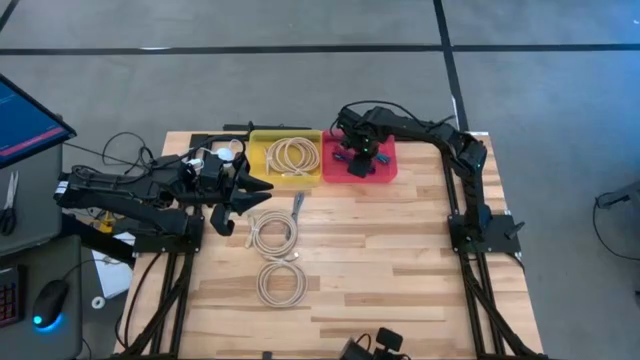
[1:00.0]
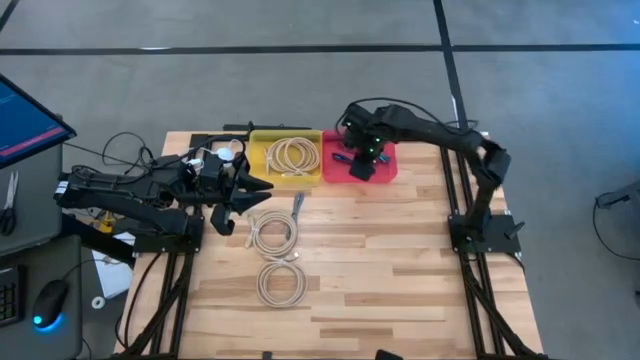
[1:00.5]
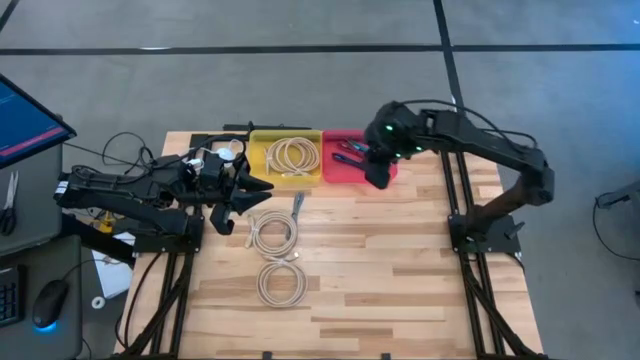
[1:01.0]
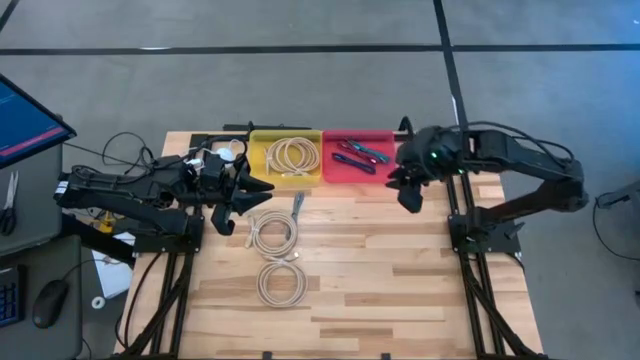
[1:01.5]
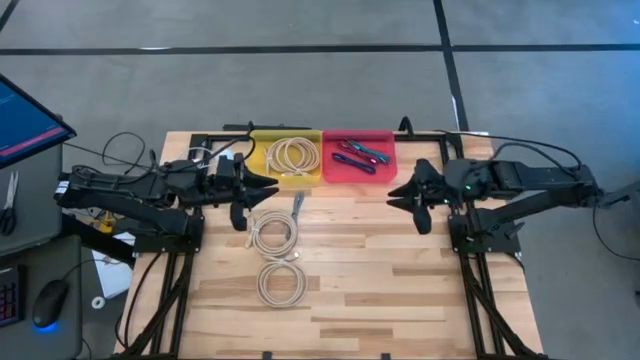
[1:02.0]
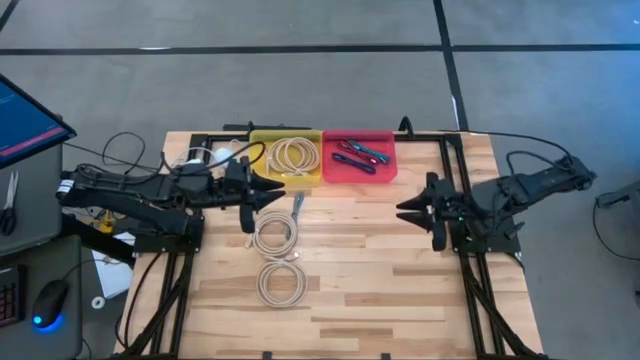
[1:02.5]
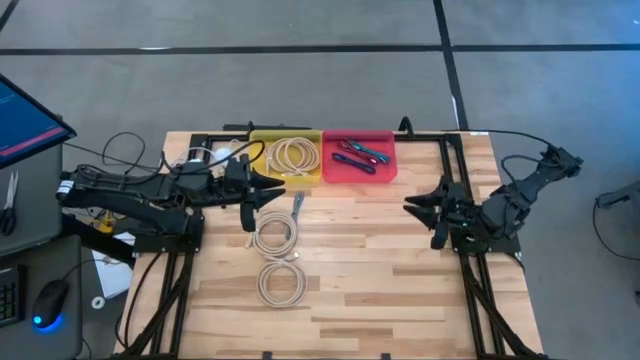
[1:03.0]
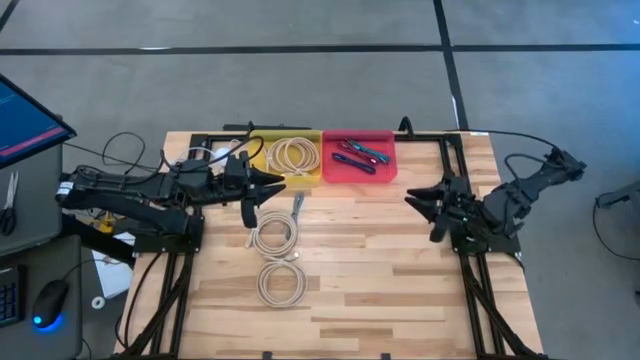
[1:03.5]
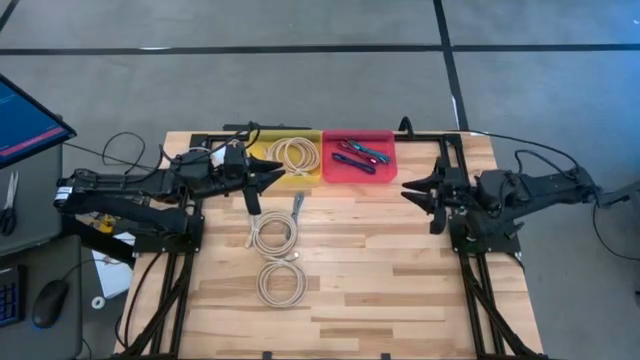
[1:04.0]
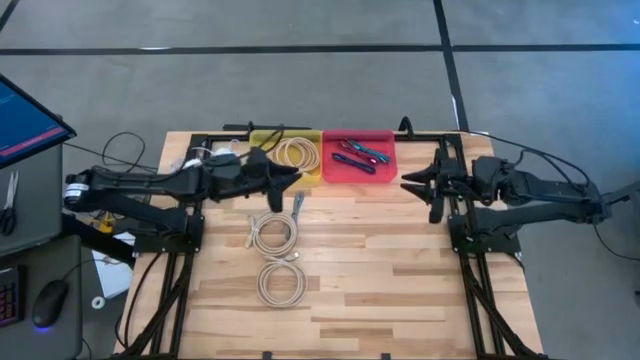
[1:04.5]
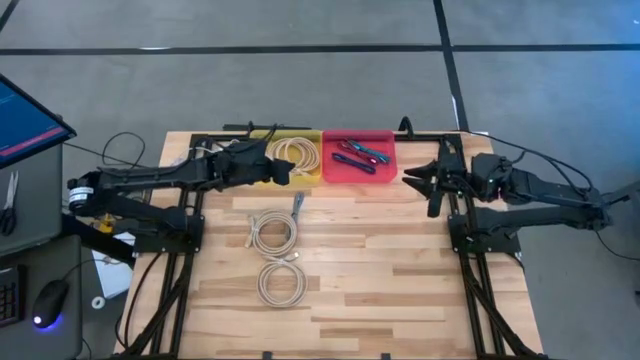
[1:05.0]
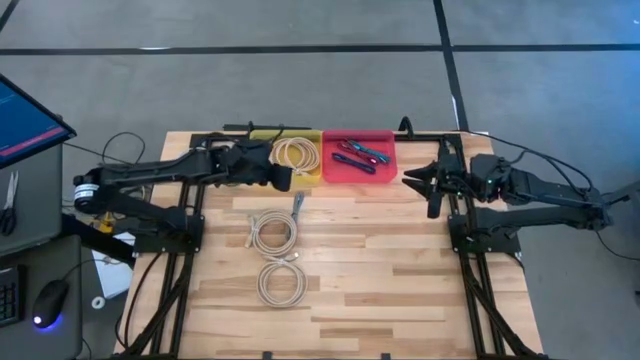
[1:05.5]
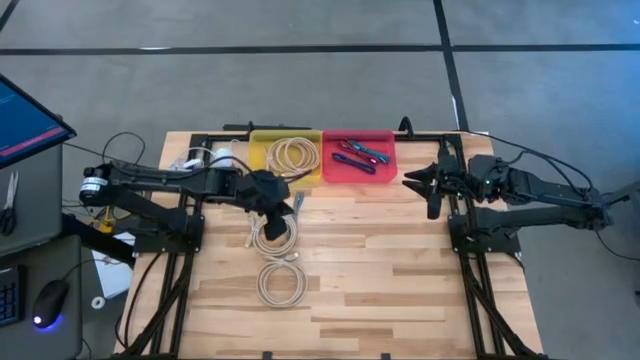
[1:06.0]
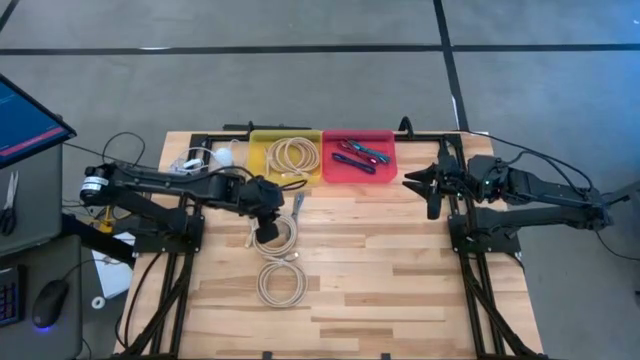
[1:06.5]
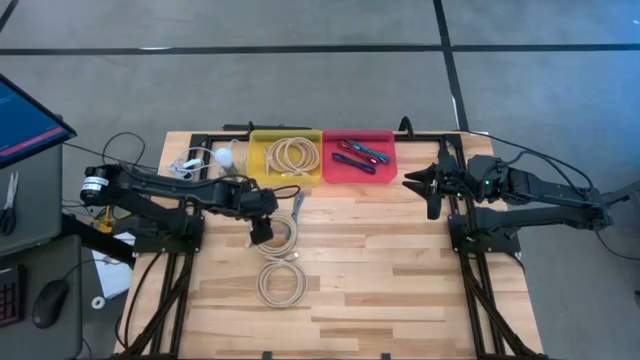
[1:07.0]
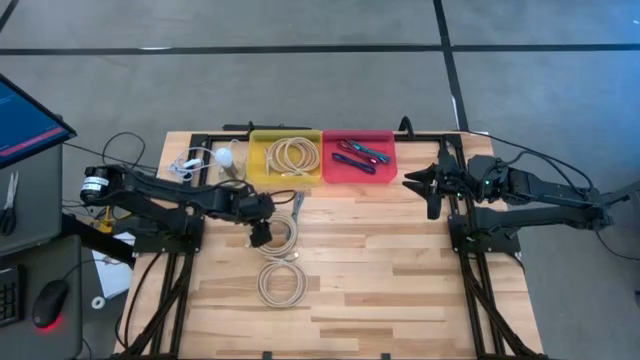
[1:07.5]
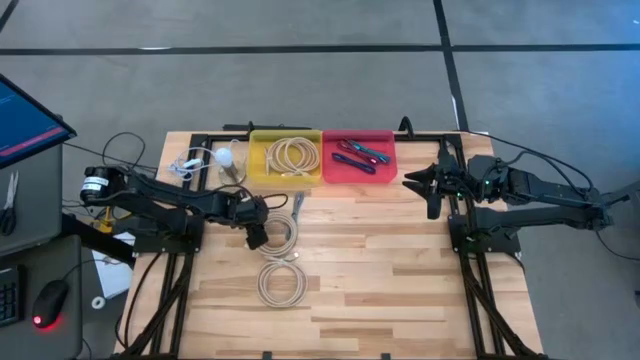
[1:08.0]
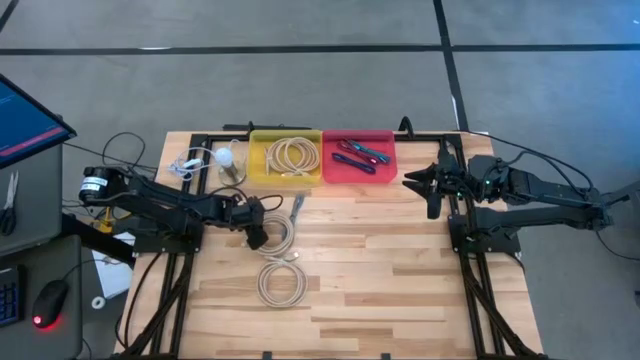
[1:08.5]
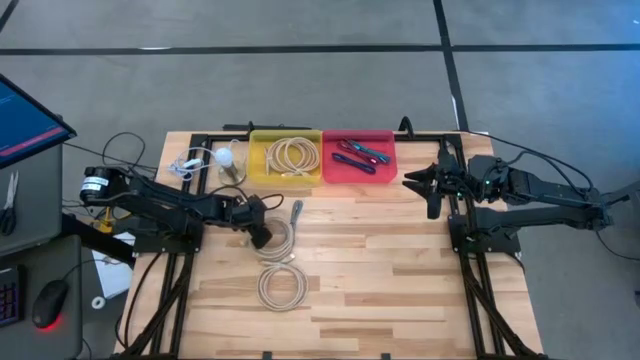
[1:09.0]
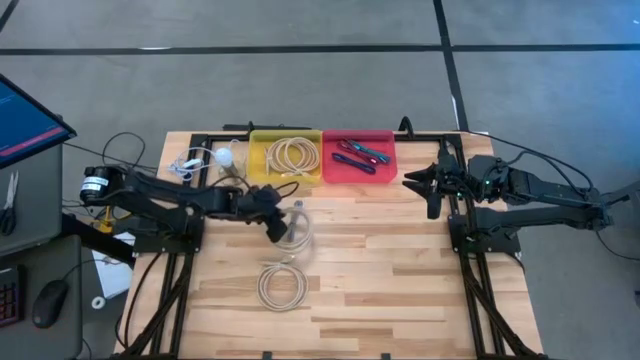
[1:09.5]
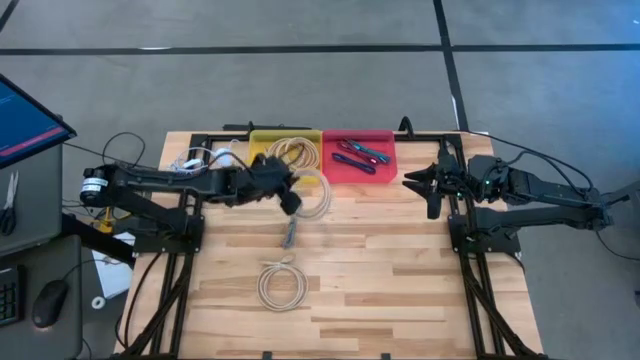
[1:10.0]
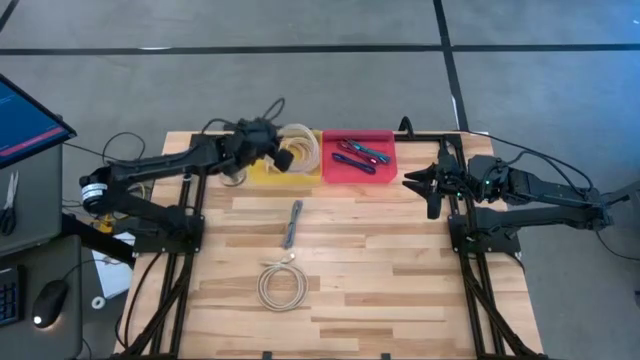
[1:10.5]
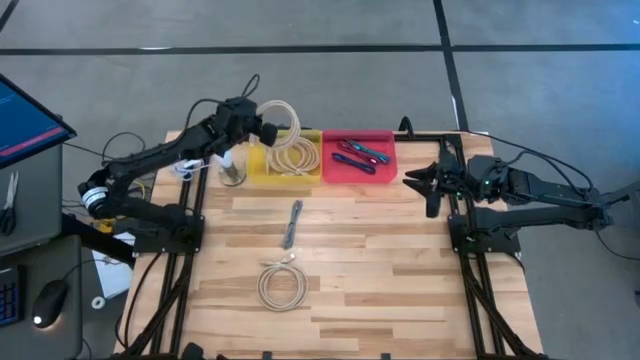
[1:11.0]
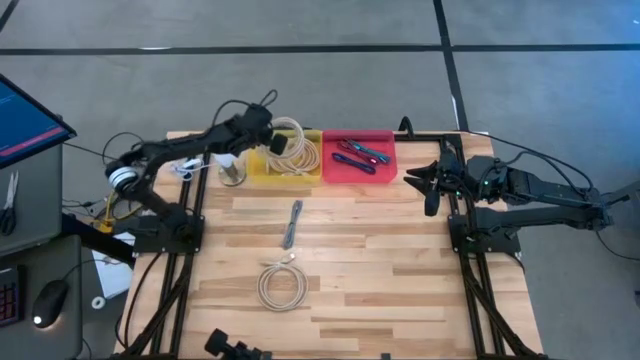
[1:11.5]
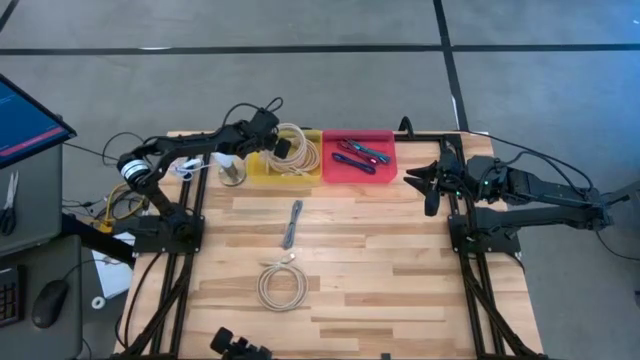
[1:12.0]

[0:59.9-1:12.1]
Task: Pick & Place USB Port
Put the large white charger cable into the yellow bin

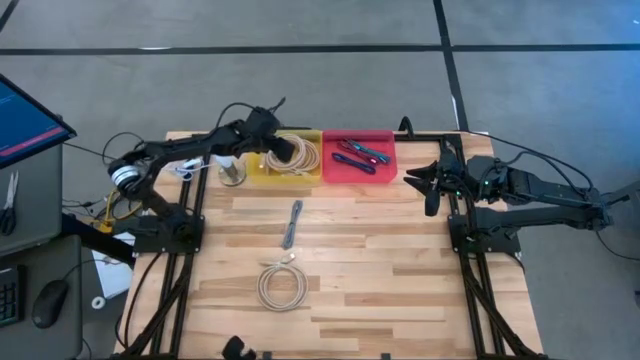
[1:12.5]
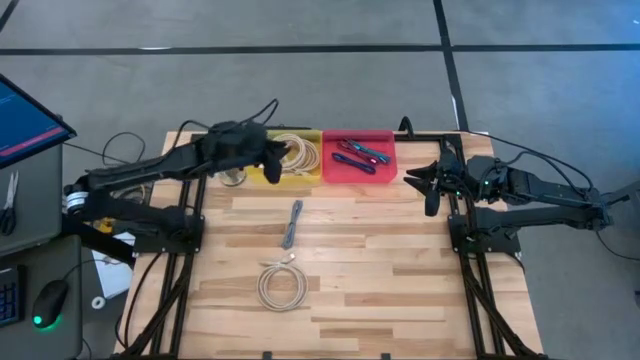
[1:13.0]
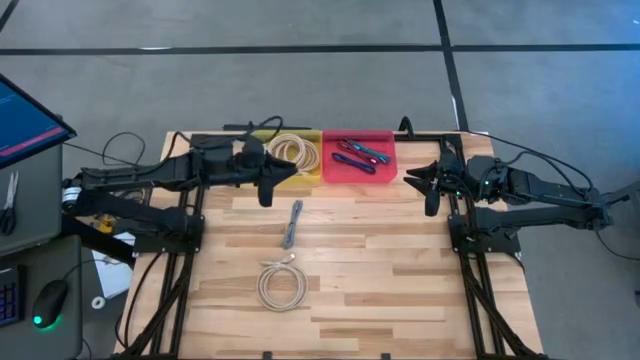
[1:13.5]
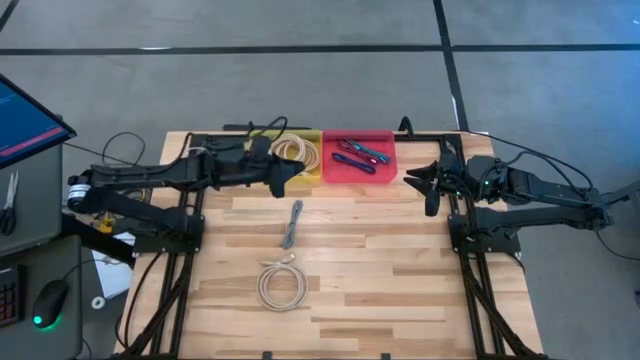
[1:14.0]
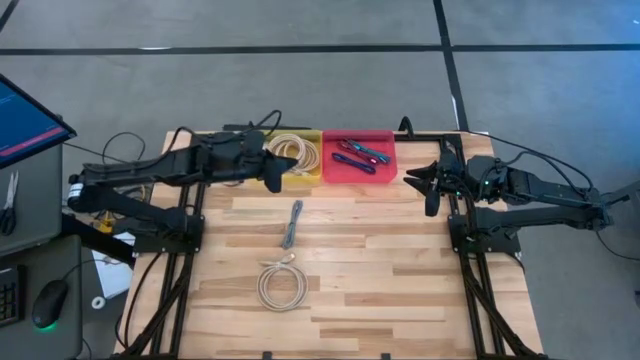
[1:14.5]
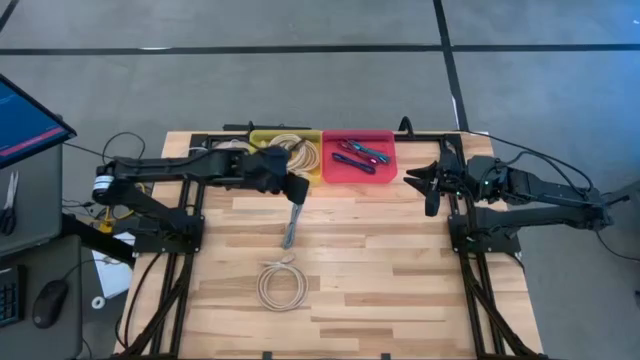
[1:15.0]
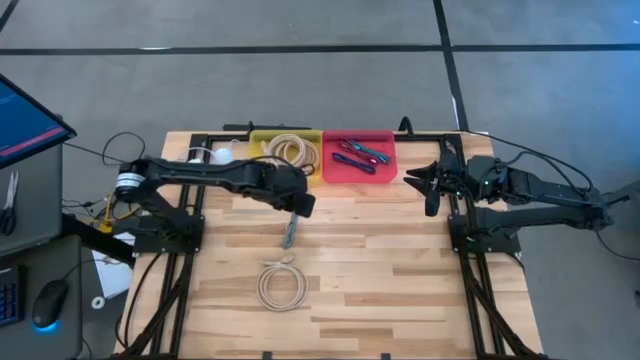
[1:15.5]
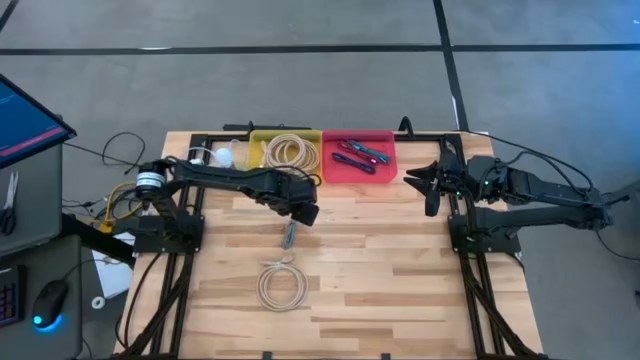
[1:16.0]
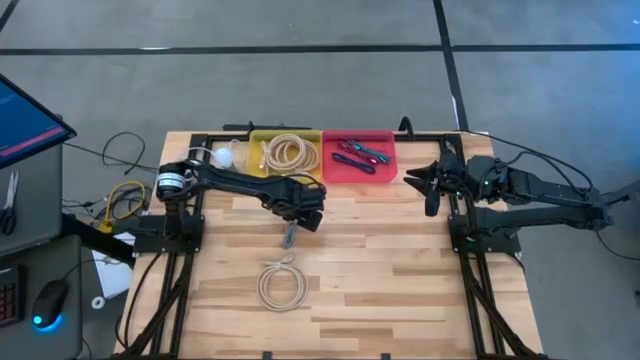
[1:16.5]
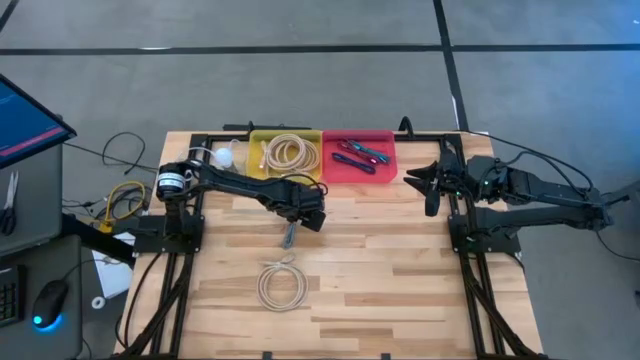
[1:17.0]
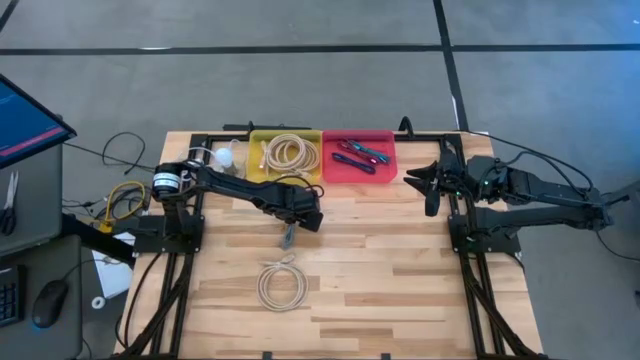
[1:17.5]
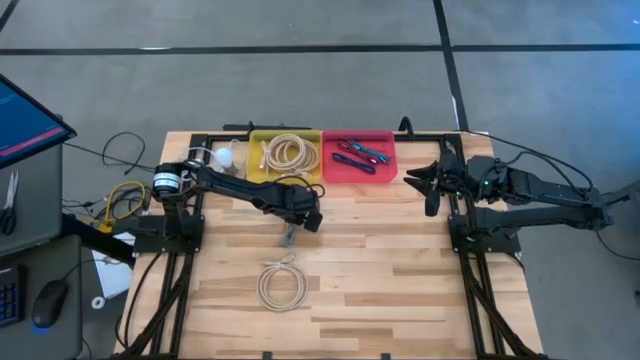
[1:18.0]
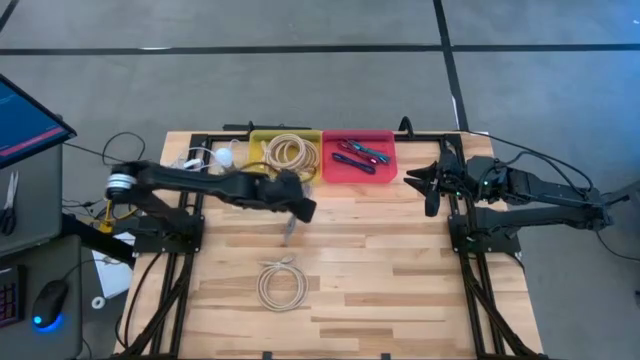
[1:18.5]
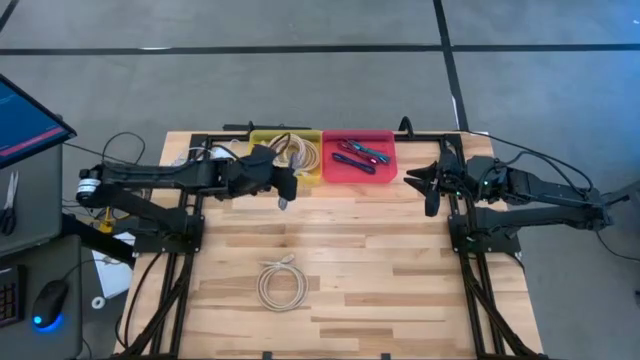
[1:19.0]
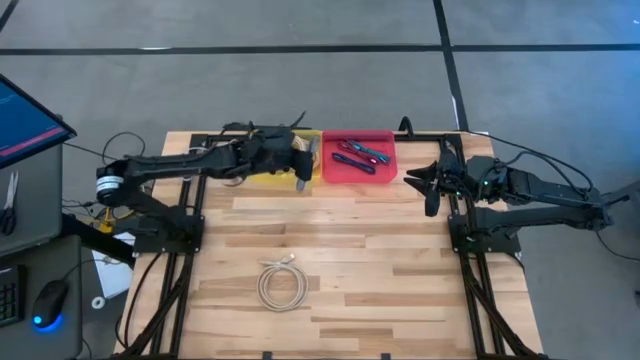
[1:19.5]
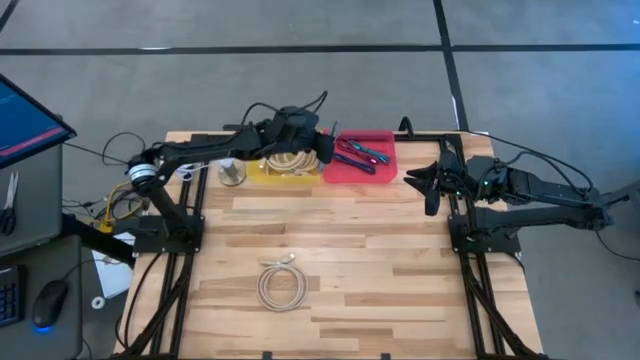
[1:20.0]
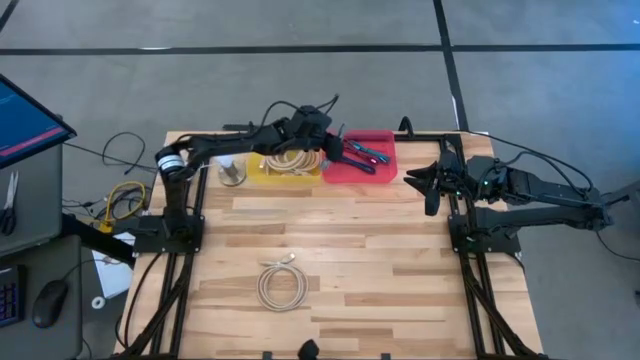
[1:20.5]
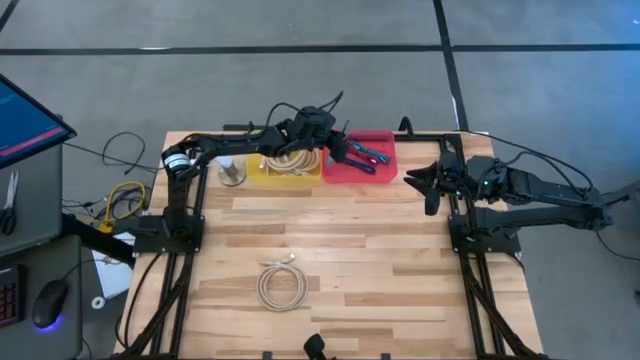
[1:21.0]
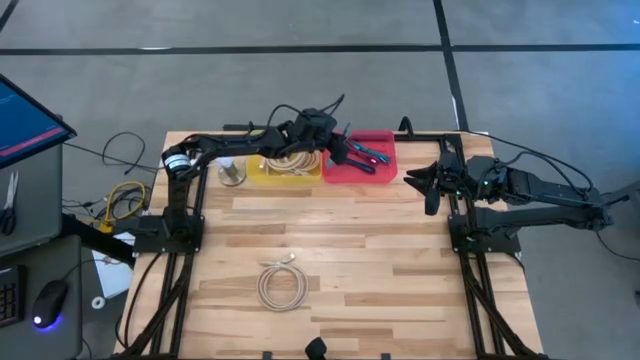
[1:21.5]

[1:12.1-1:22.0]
Put the small black and white charger cable into the red bin

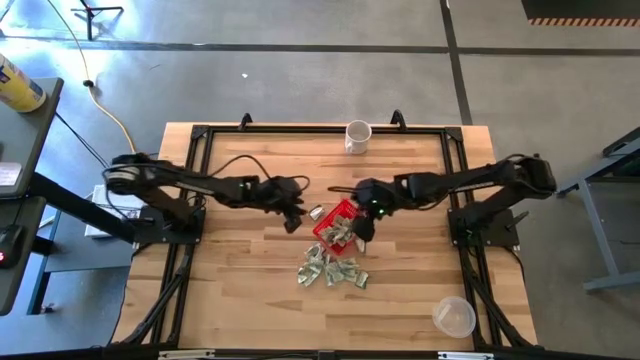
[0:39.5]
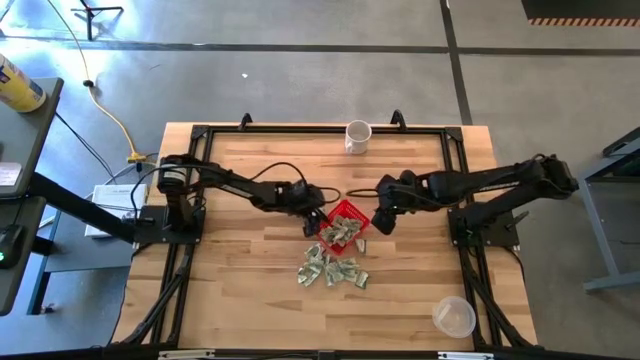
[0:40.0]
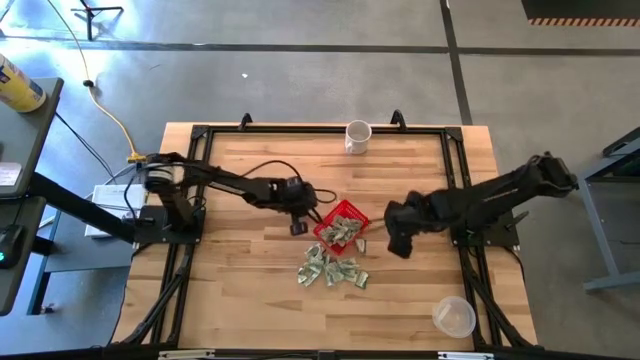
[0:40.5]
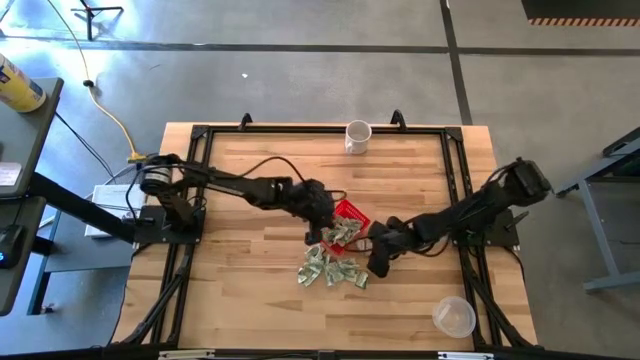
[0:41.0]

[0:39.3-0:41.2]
Task: Pick and place items into bin
Put the green truvia packet into the red bin
